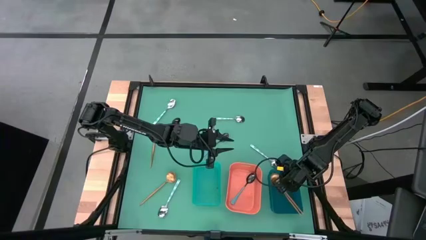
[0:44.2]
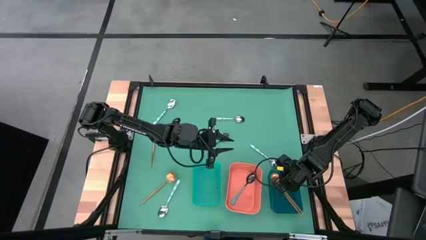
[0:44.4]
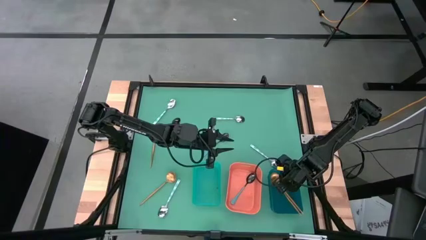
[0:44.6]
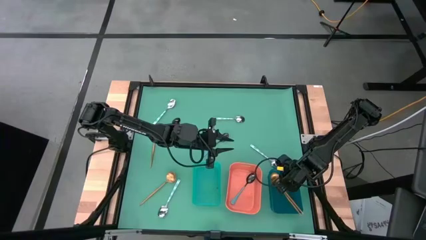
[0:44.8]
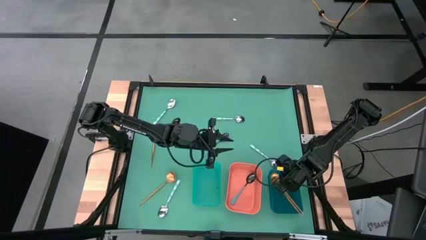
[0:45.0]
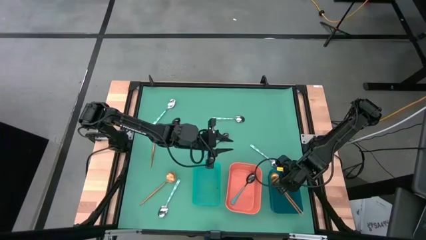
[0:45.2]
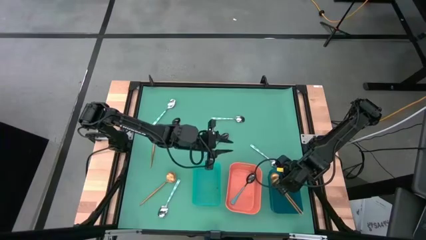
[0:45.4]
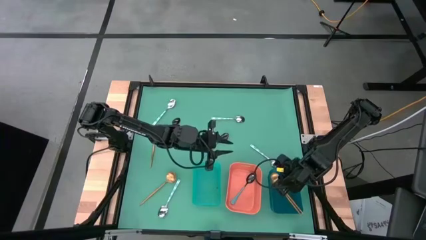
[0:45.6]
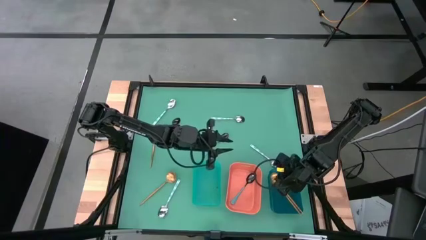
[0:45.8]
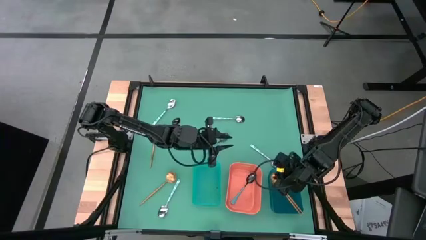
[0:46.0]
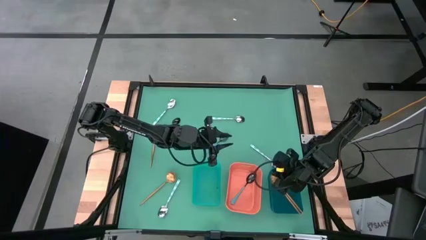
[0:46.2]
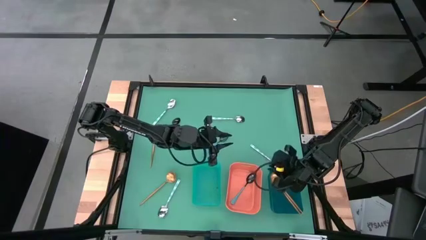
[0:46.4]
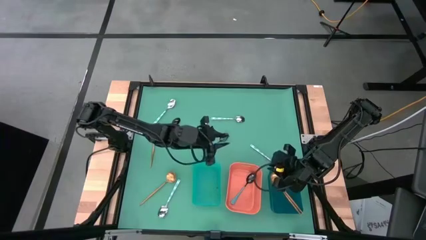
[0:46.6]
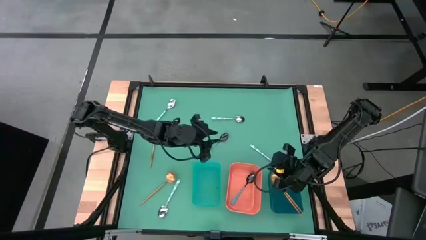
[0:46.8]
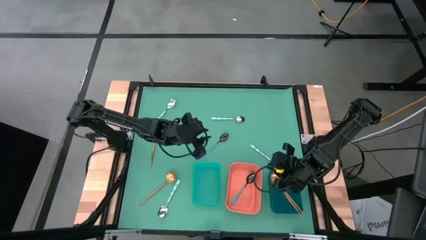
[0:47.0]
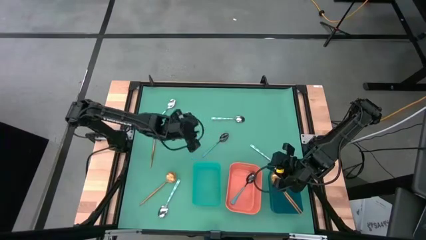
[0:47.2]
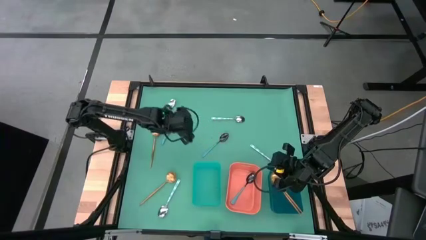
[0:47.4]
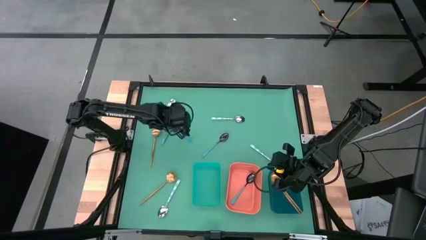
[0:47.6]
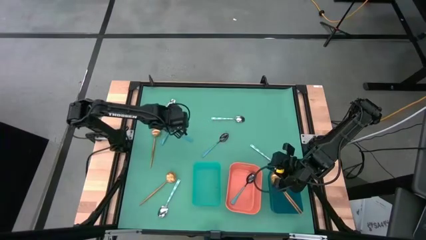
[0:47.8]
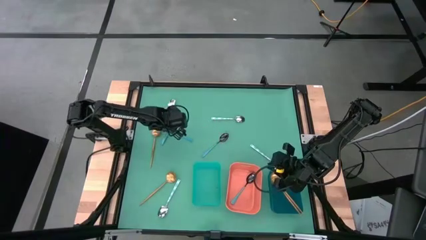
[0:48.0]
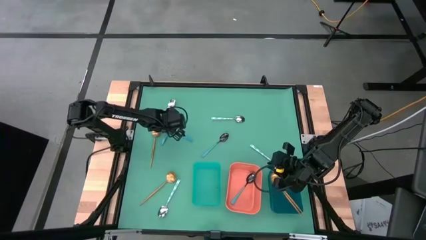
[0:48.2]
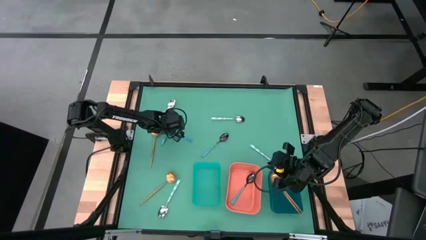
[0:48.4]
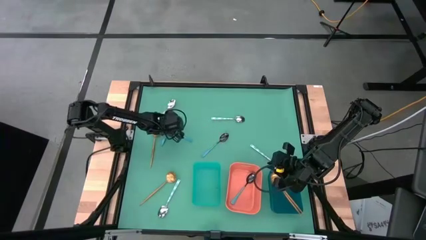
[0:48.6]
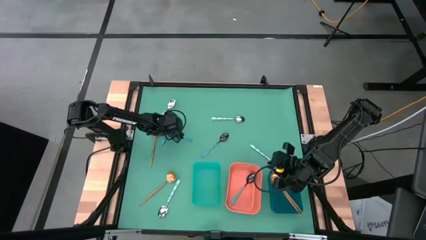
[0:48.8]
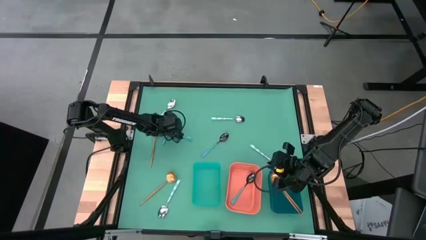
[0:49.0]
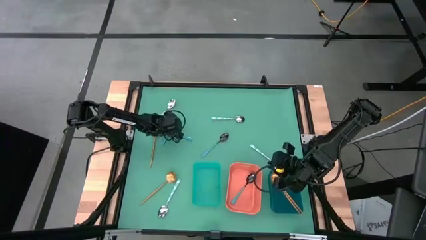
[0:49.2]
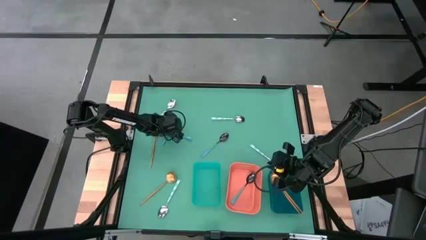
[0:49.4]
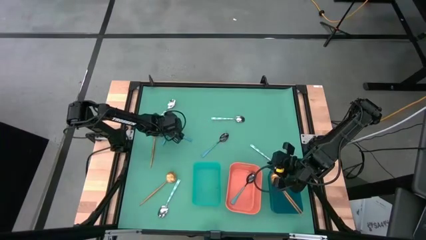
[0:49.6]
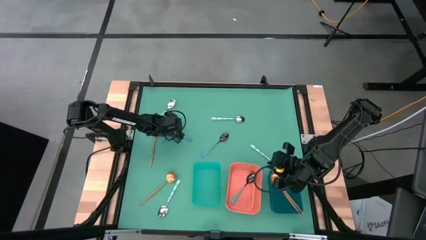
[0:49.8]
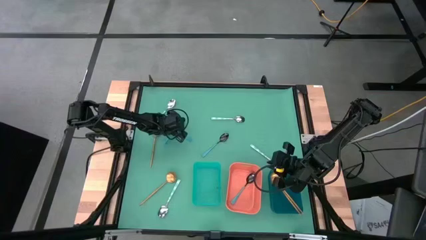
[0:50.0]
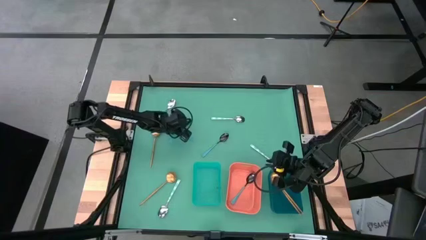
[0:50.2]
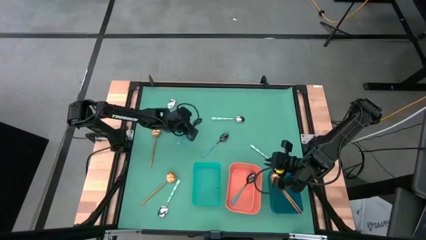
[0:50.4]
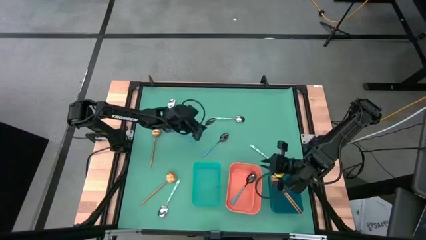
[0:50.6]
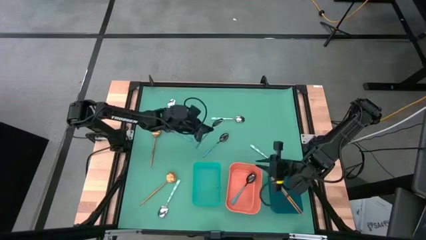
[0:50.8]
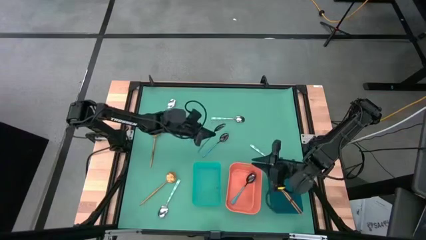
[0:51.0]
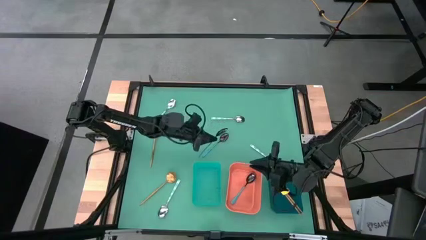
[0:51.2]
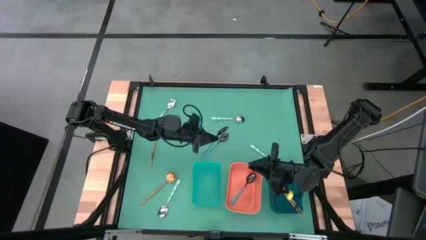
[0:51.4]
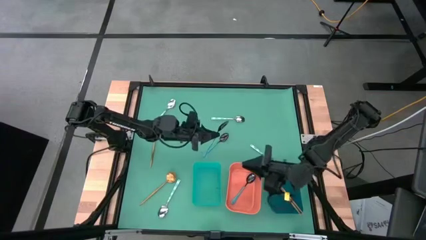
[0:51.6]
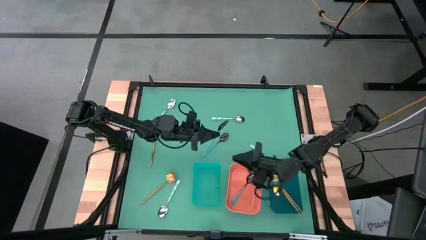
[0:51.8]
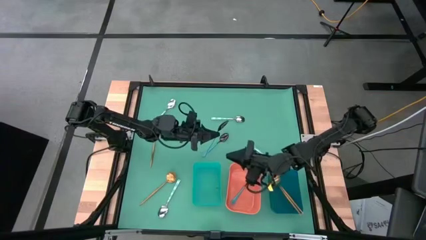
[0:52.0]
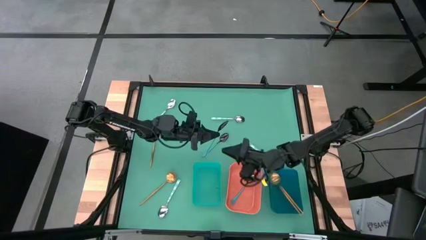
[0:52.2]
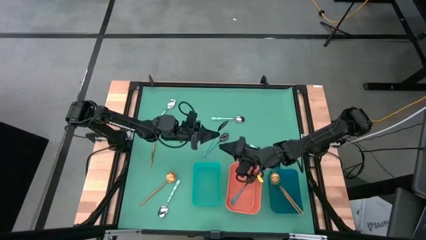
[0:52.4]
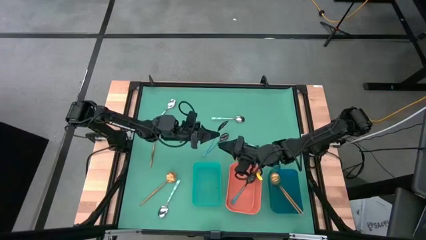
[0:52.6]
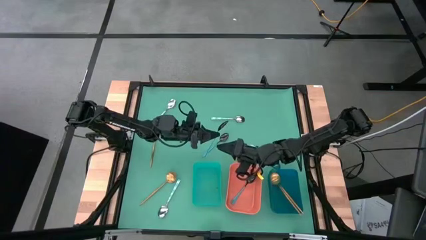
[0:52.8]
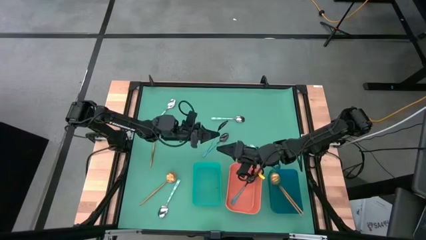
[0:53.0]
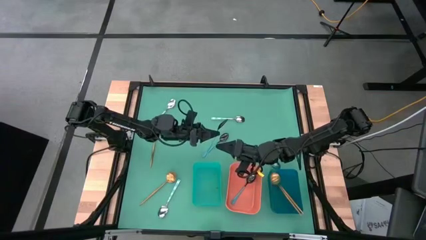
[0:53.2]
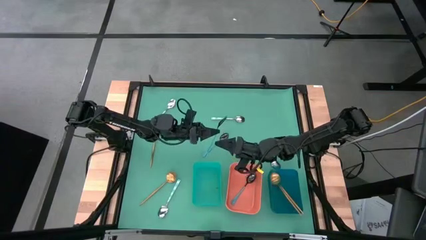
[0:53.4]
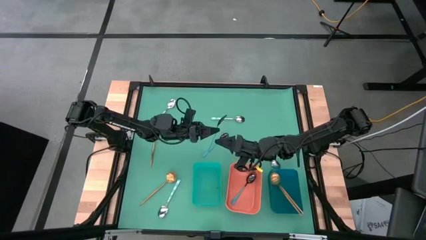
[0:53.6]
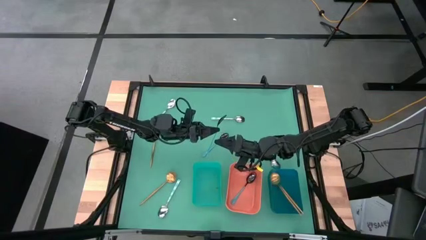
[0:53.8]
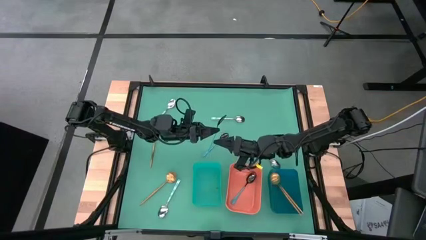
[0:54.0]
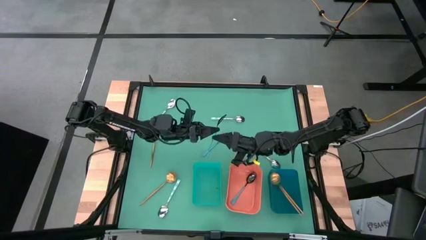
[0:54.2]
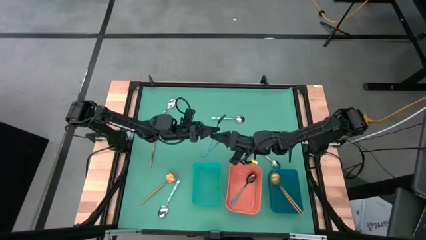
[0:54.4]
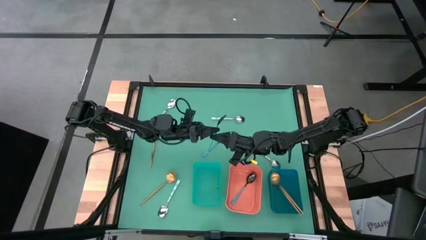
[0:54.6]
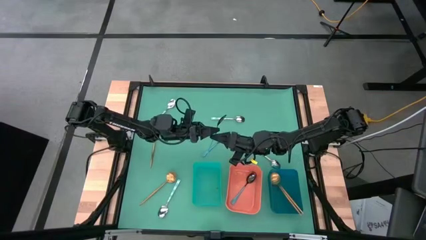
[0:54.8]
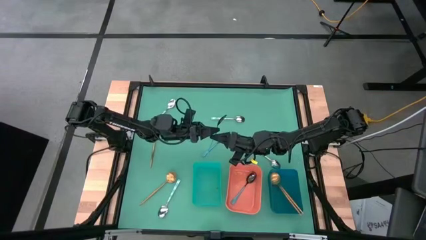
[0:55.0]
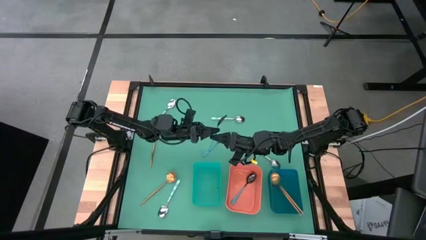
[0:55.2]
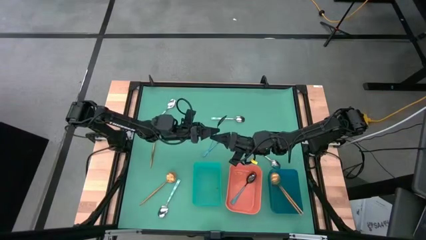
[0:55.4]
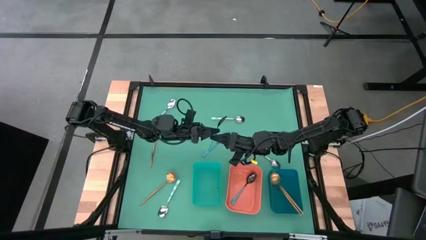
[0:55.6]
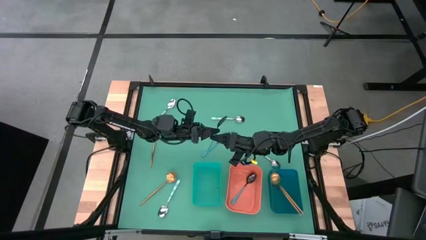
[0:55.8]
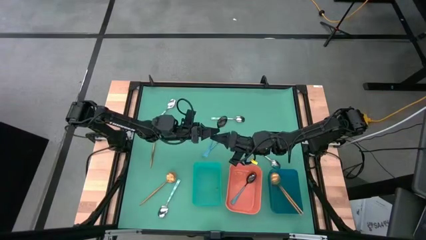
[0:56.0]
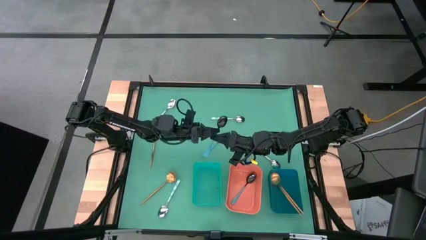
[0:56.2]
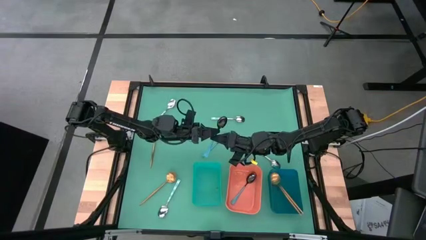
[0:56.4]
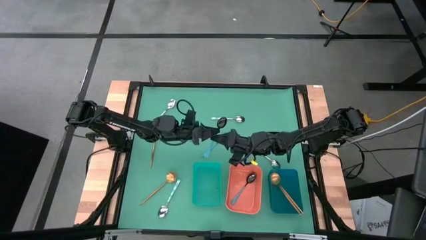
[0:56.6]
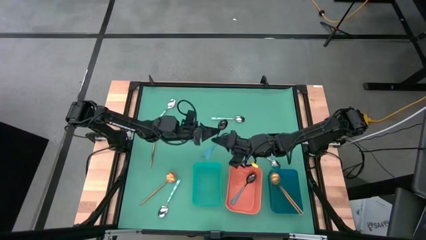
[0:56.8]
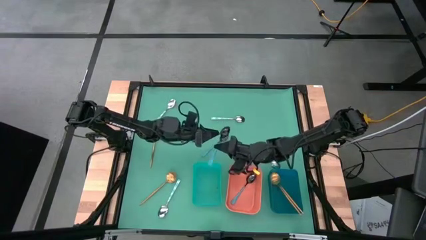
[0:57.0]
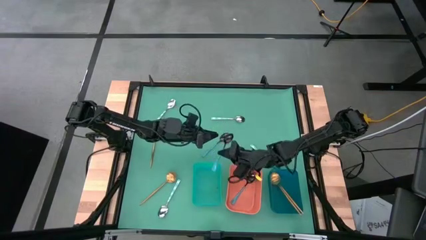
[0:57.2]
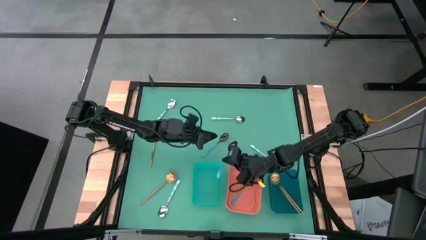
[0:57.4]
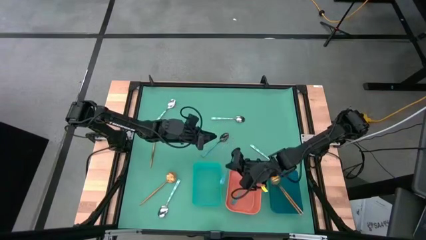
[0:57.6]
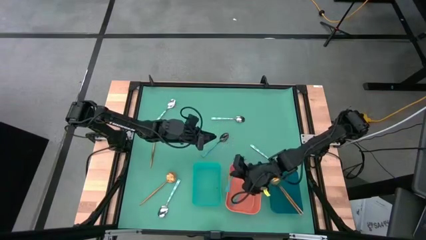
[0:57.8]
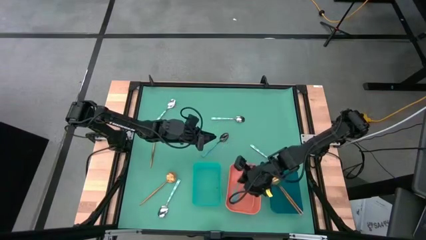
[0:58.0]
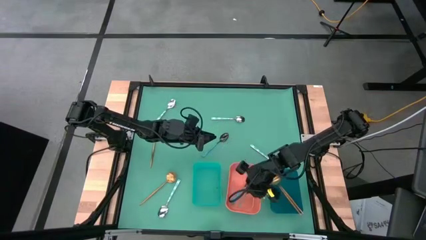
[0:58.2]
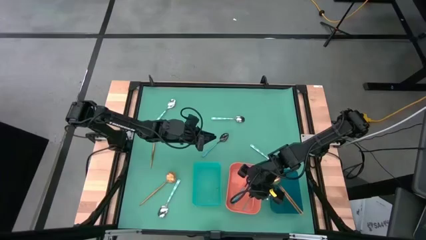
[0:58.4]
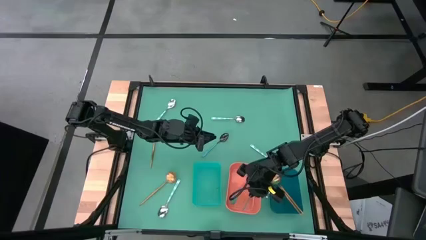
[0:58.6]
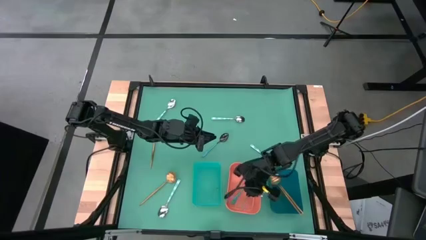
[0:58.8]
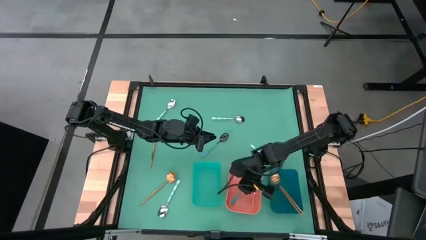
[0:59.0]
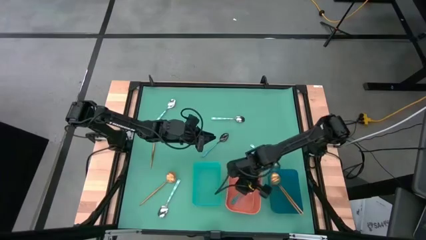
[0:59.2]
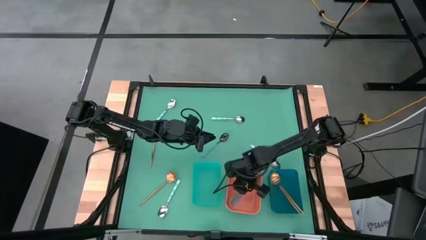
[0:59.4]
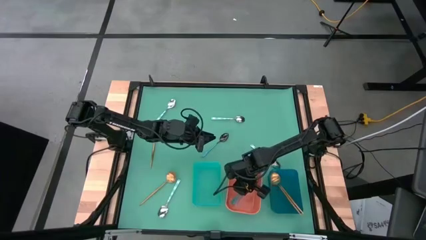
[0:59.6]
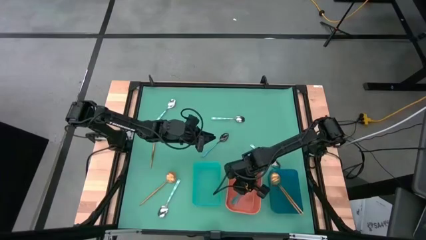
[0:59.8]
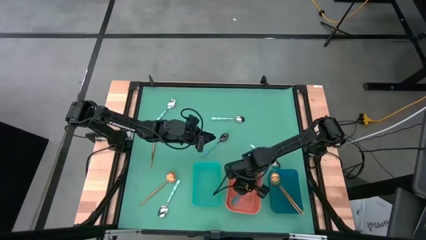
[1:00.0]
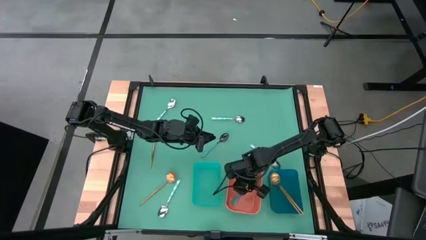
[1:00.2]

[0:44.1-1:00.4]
Task: Sort silverware by color (type)
Put the blue spoon into the orange bin
